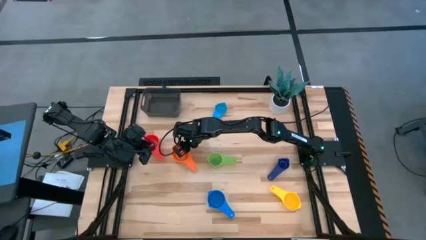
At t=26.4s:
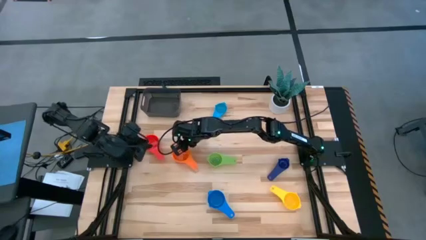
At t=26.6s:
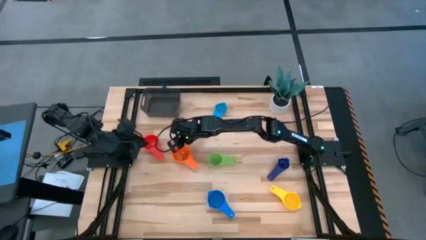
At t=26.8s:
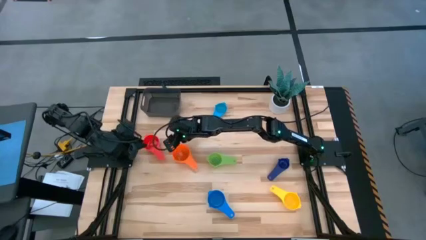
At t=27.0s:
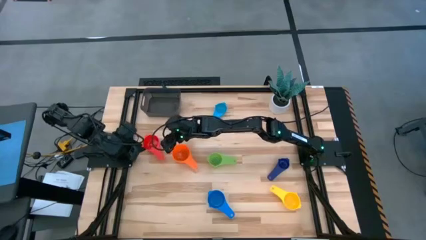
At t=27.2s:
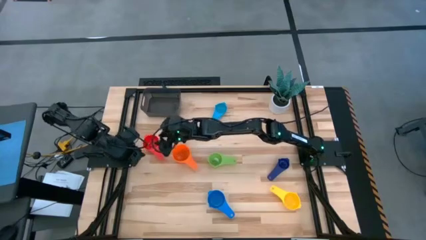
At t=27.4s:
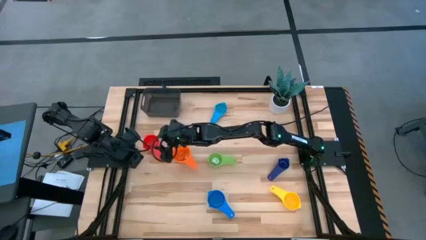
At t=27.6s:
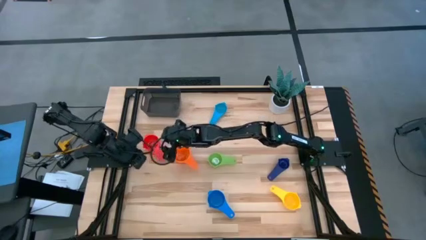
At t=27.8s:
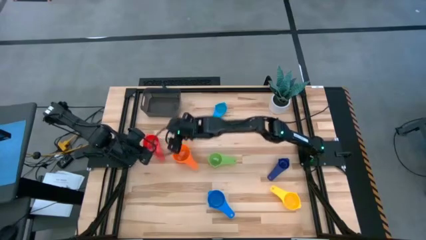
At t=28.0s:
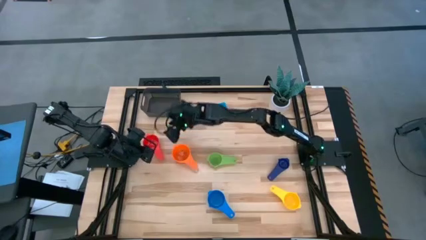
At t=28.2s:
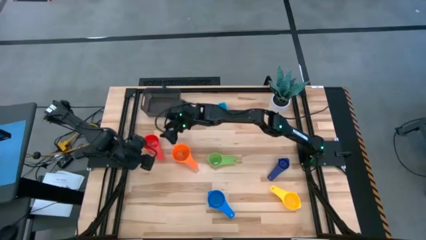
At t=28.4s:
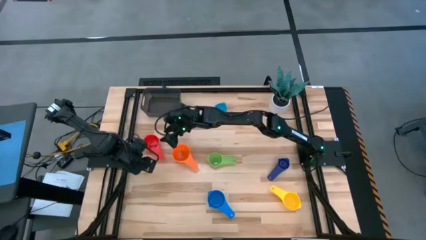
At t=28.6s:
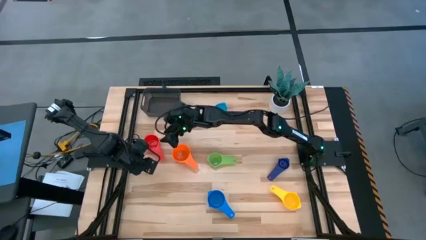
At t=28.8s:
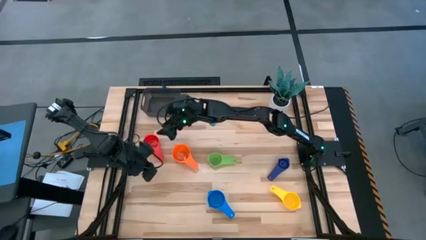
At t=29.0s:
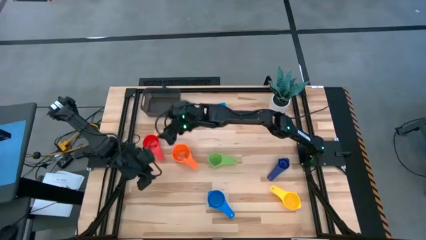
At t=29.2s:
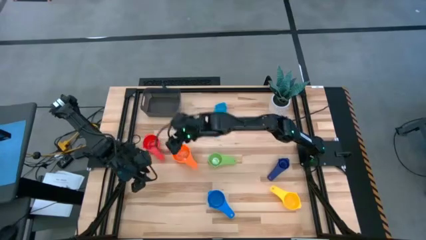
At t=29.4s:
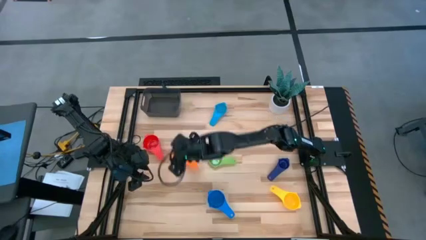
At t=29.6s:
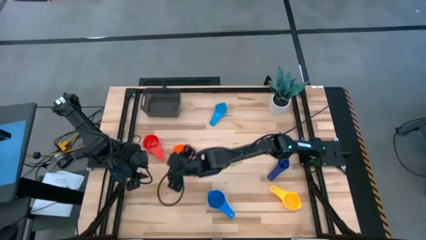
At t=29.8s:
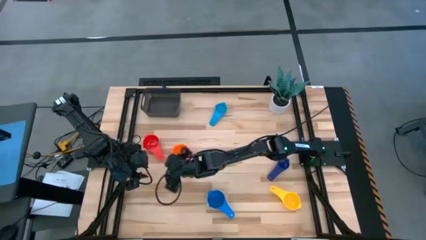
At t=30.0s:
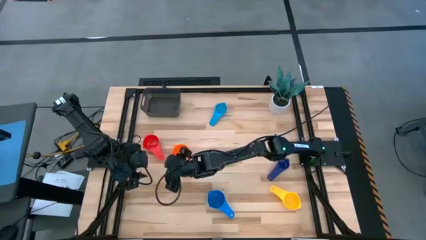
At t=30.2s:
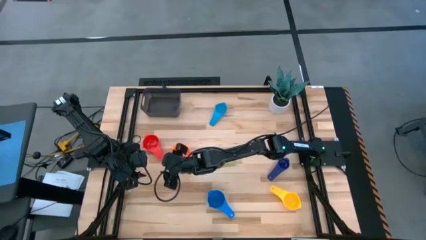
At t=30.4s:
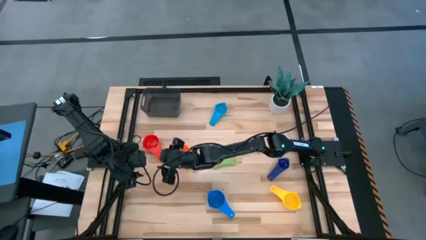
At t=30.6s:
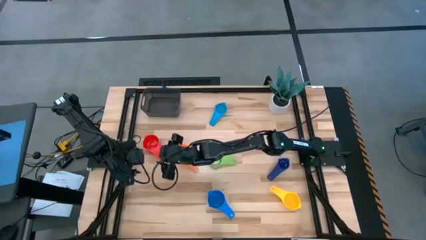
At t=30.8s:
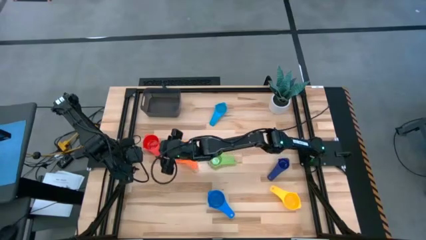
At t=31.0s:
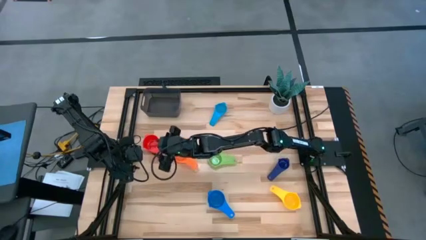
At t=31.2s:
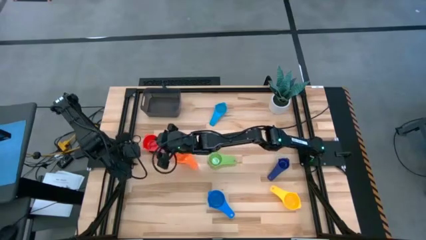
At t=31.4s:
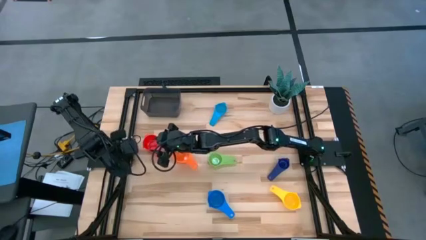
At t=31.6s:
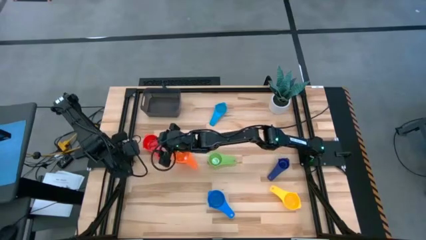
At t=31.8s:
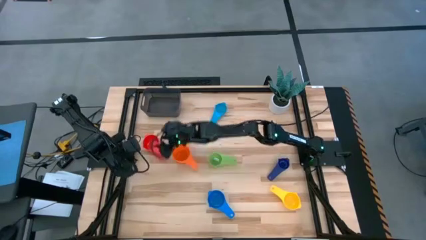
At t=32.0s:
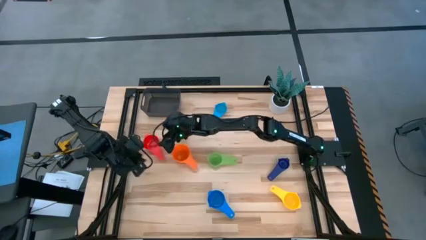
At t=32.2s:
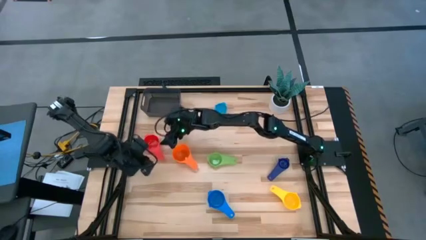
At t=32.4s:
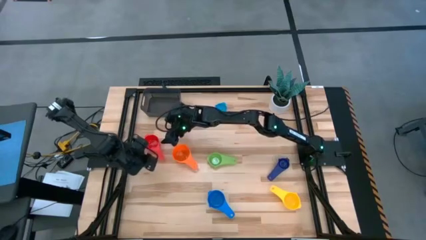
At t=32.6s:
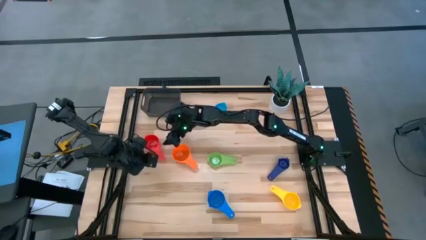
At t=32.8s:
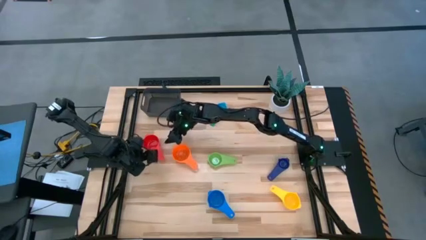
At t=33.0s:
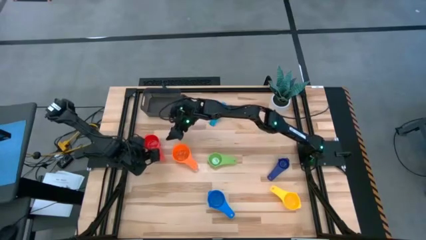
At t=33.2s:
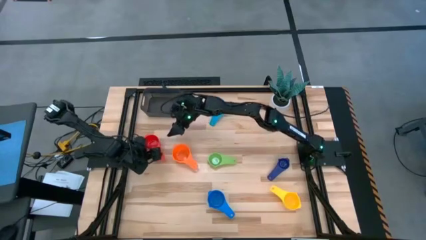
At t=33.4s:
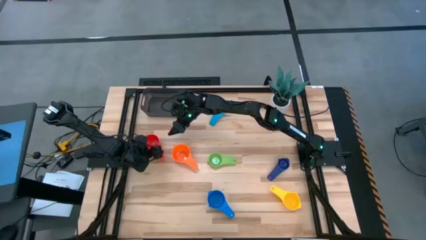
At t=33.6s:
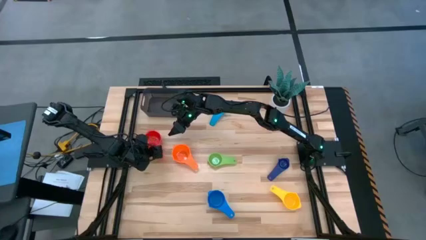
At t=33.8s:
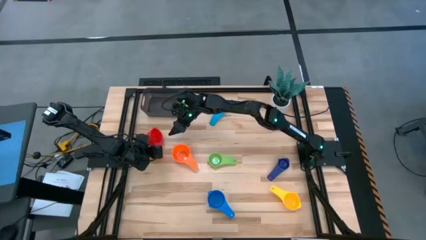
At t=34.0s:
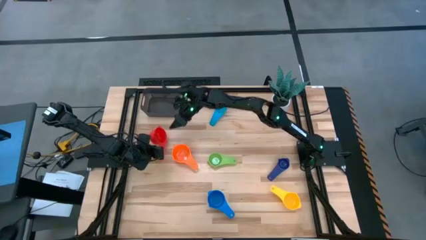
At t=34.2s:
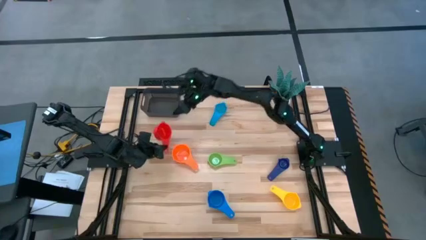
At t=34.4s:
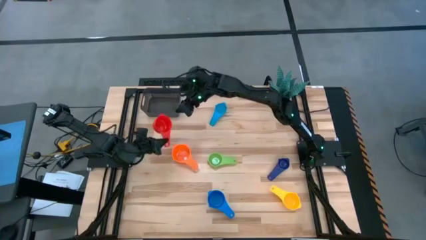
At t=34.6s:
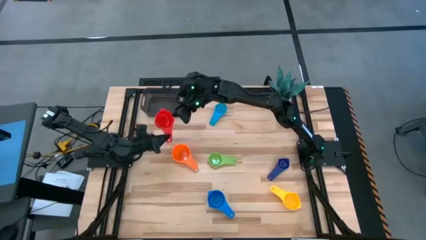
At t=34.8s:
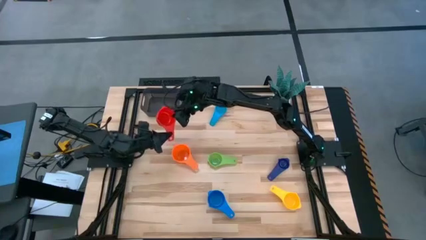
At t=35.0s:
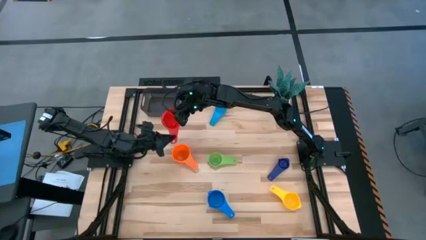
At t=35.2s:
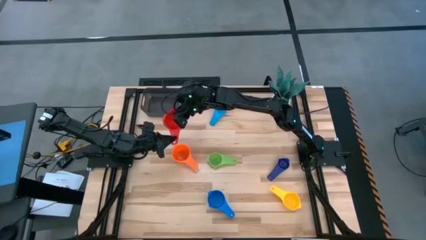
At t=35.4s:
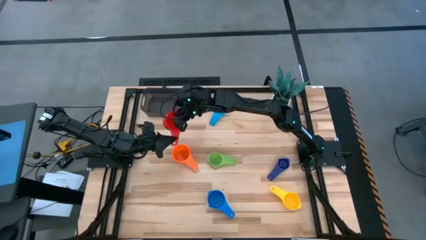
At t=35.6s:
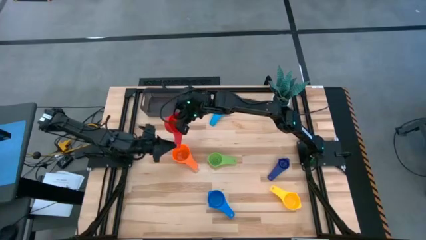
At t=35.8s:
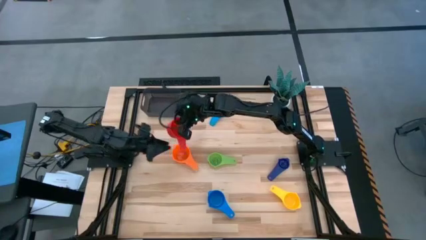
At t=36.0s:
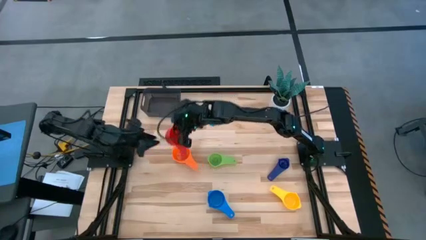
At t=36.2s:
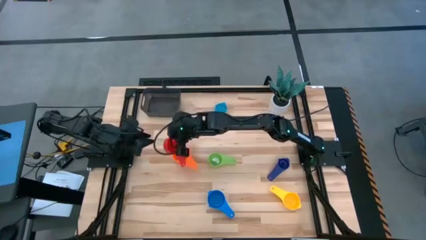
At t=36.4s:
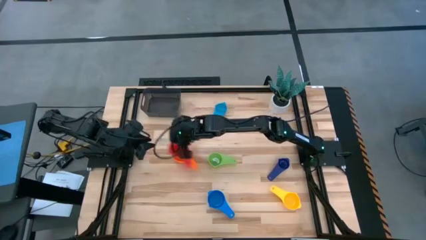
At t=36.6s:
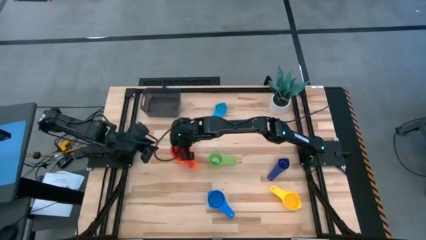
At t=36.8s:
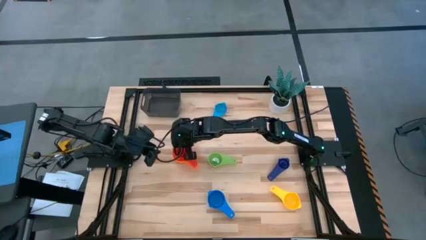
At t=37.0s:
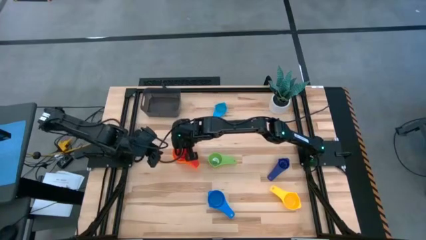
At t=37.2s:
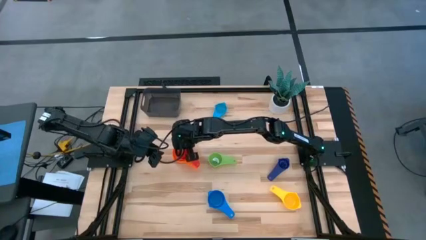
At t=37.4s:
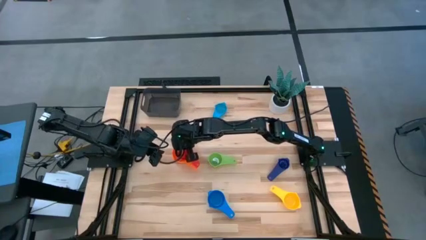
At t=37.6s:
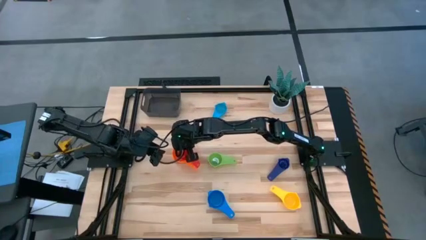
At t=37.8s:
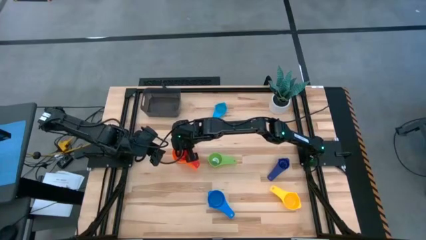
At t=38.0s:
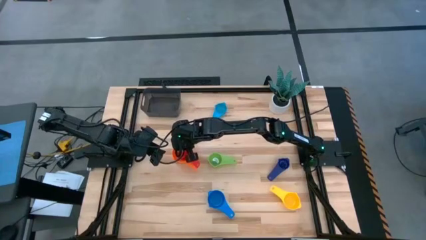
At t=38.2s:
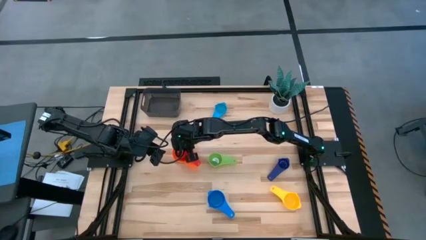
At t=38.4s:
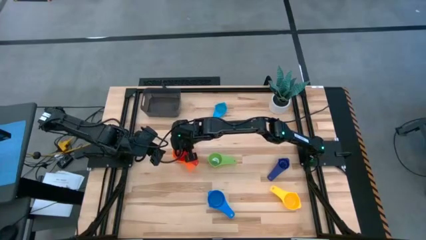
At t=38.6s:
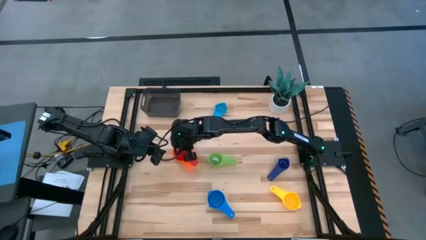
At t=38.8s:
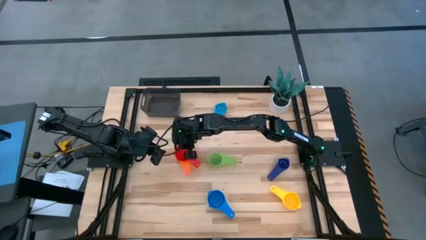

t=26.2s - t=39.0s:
Task: Nest measuring cups in basket
Stack the red measuring cup on top of the orange measuring cup

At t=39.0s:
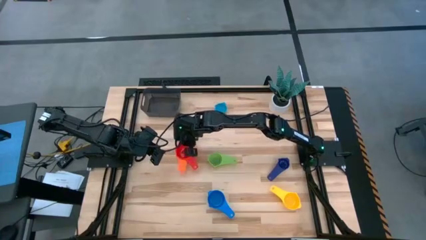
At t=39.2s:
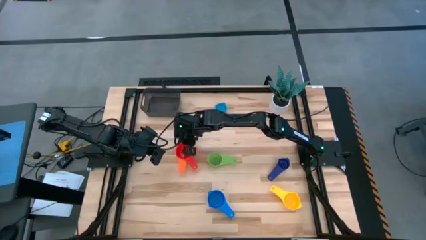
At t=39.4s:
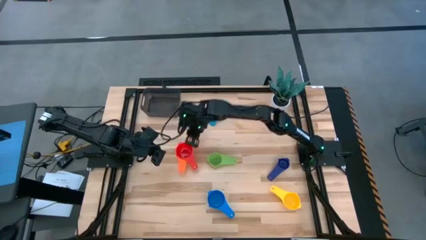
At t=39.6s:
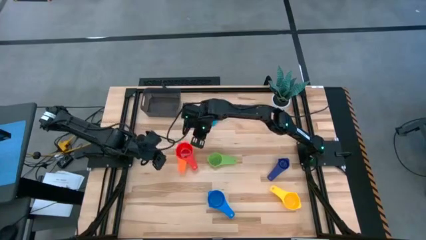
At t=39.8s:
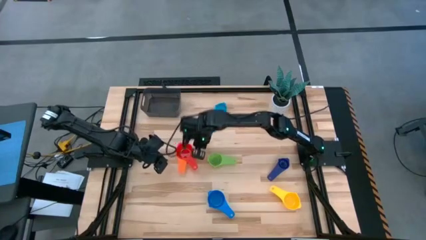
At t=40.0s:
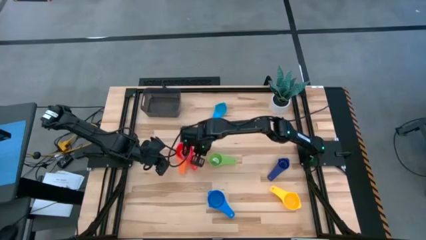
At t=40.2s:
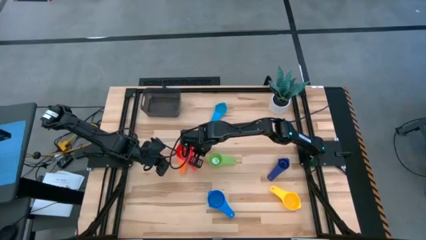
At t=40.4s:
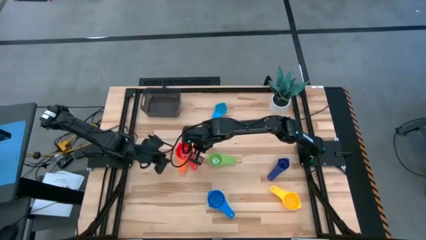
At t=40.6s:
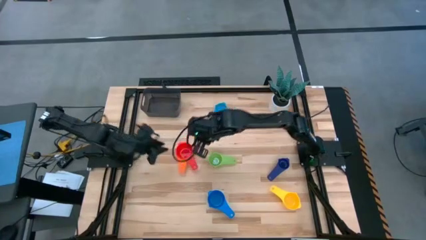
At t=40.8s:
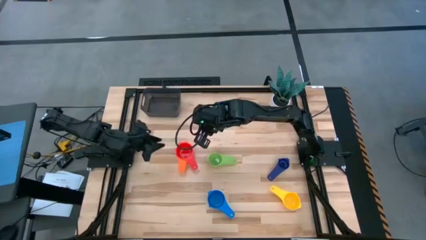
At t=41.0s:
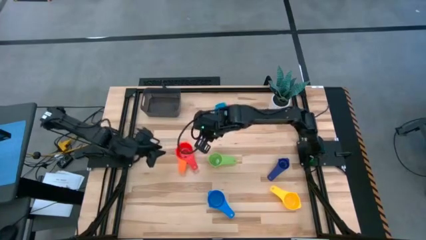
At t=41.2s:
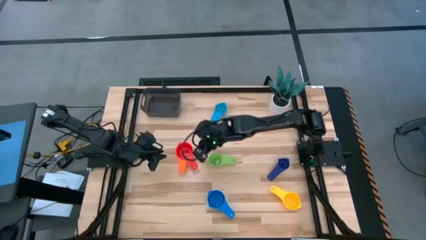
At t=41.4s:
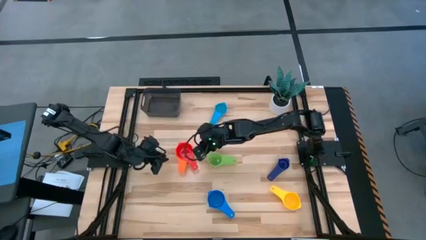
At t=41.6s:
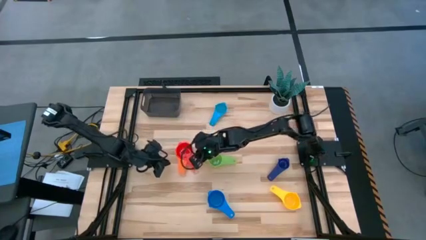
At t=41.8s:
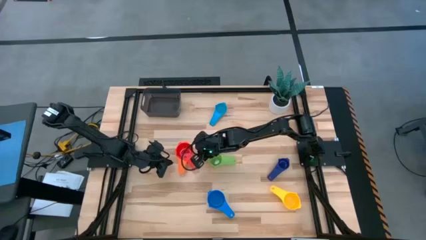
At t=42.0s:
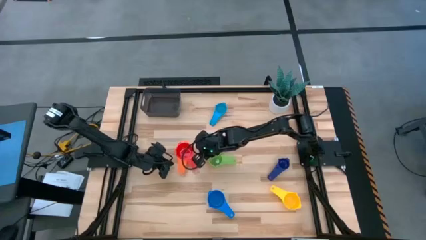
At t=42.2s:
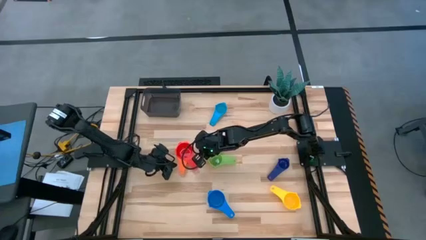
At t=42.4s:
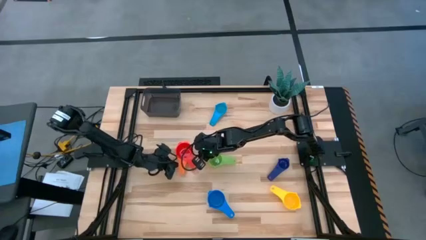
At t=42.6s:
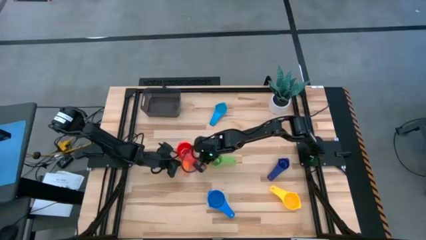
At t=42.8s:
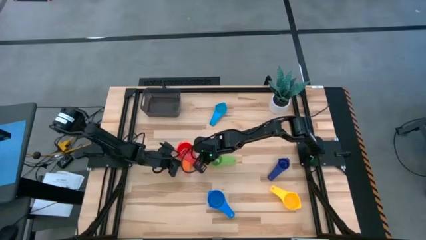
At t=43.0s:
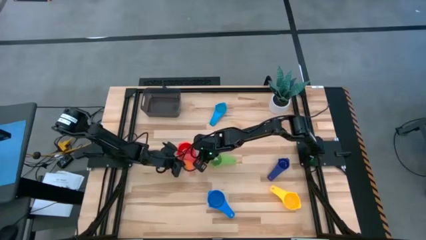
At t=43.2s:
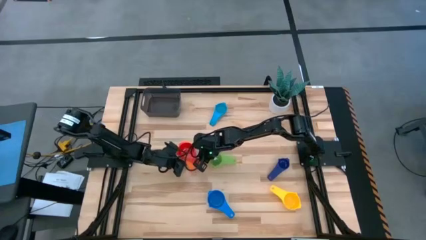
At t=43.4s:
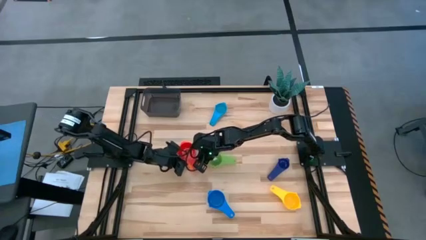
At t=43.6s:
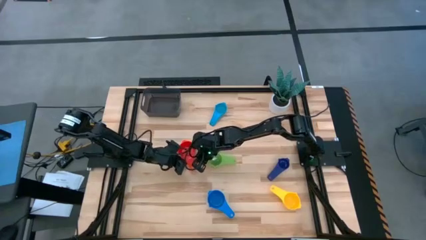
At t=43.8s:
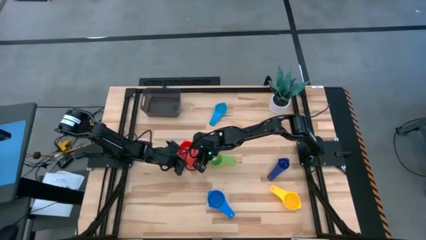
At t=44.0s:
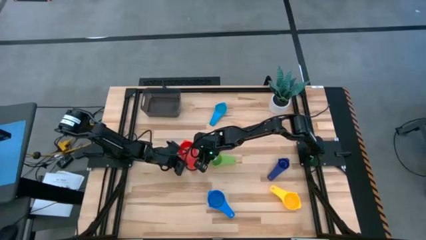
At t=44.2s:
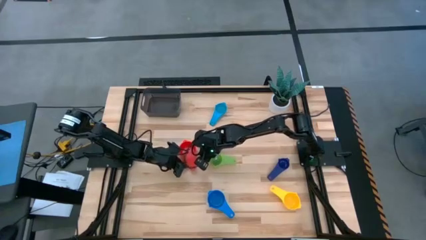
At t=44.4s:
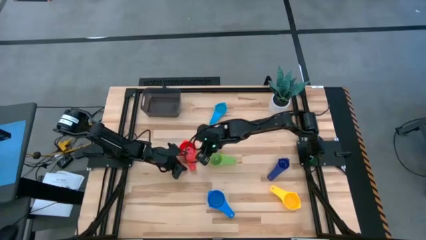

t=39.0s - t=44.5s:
Adjust the stacked measuring cups on the table
